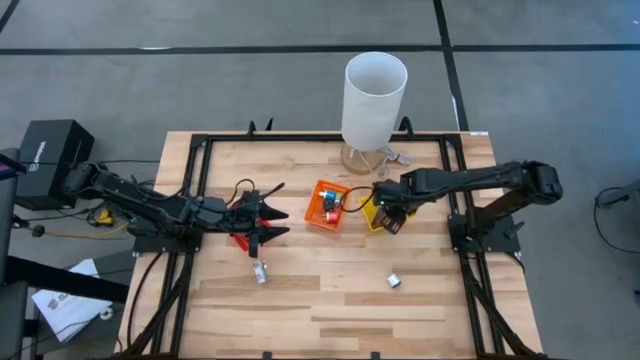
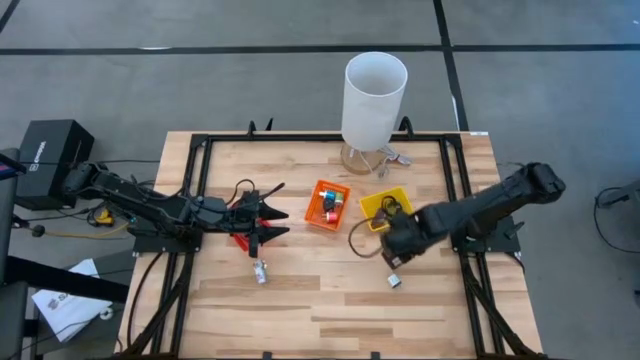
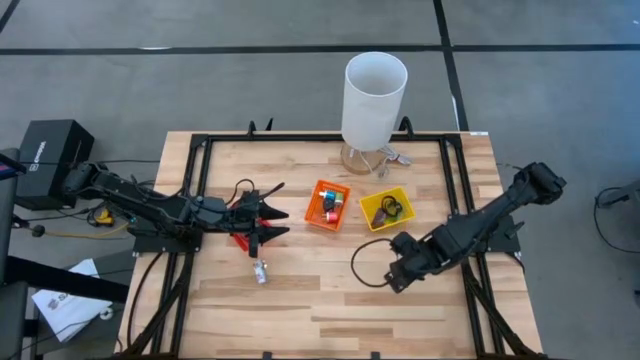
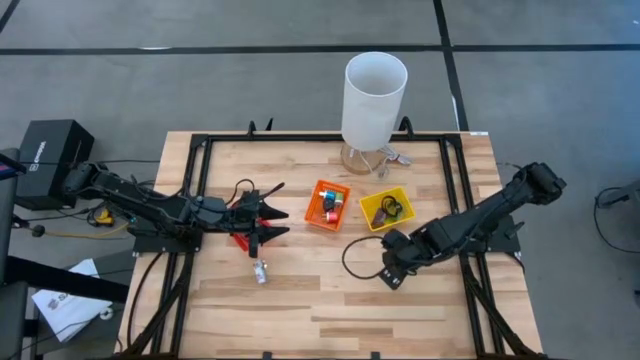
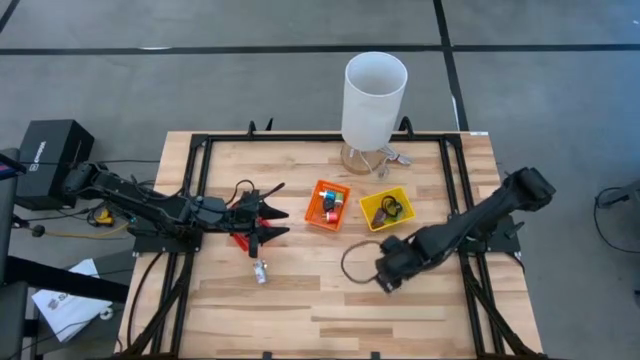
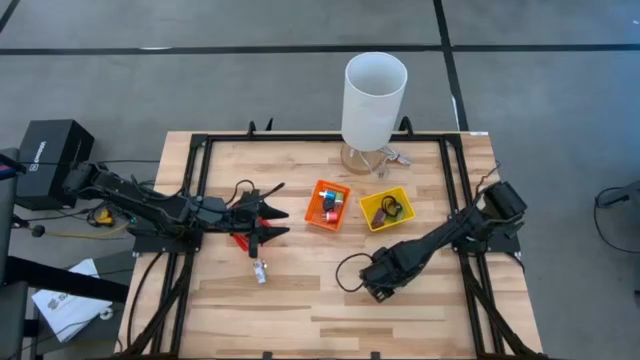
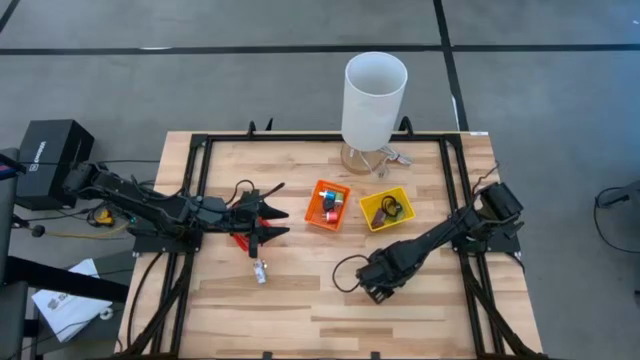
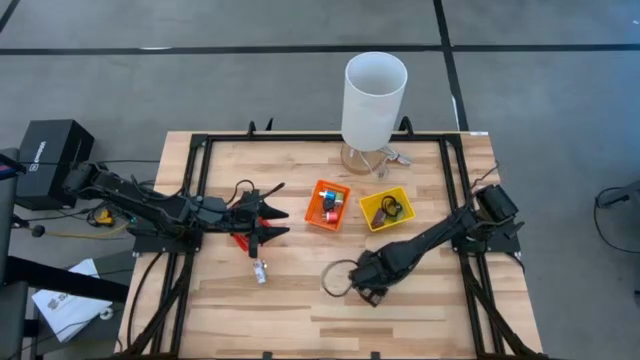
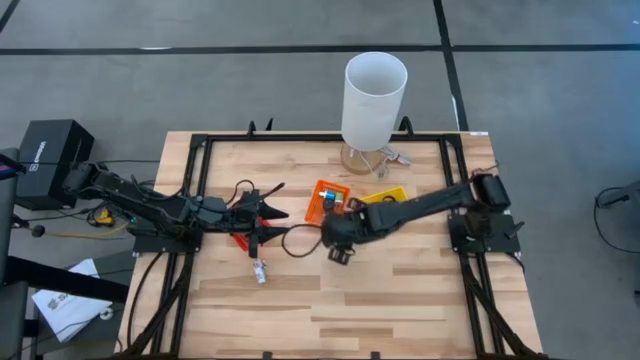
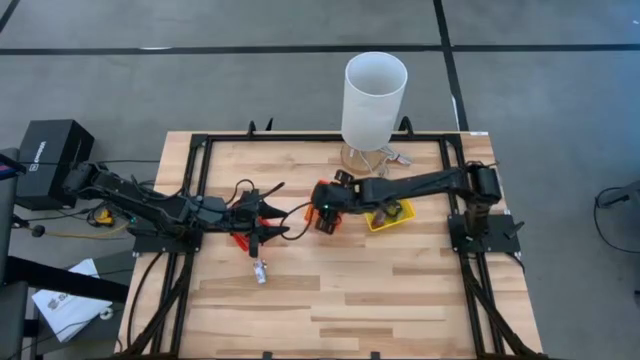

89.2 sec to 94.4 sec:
Task: Pick & Place Office items
Put the white charger adapter into the orange bin

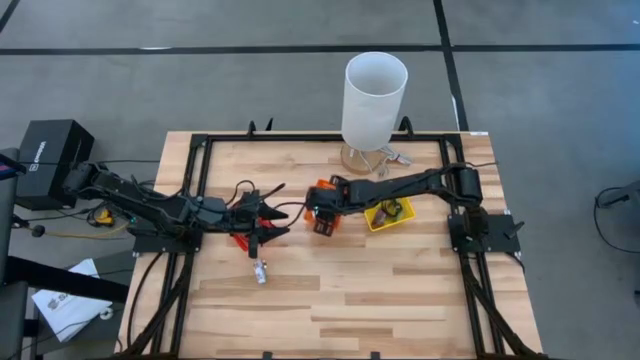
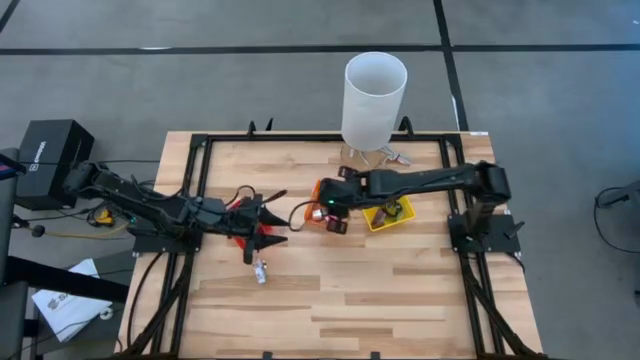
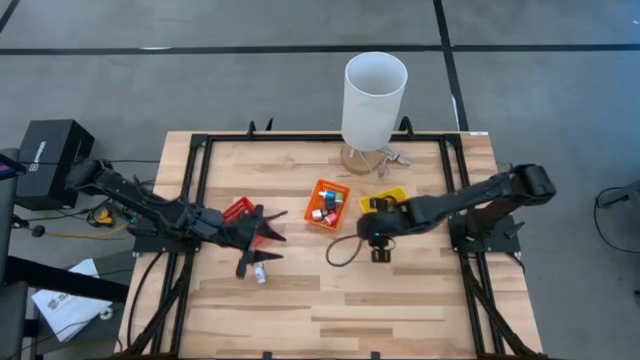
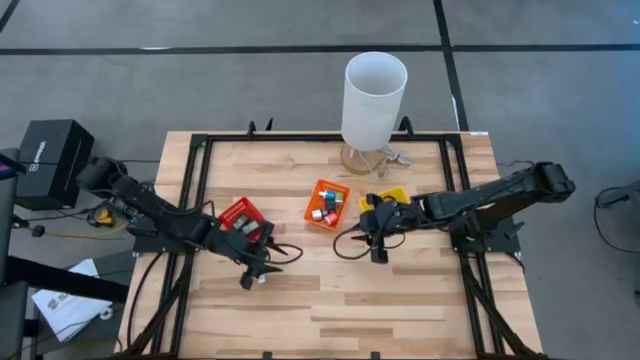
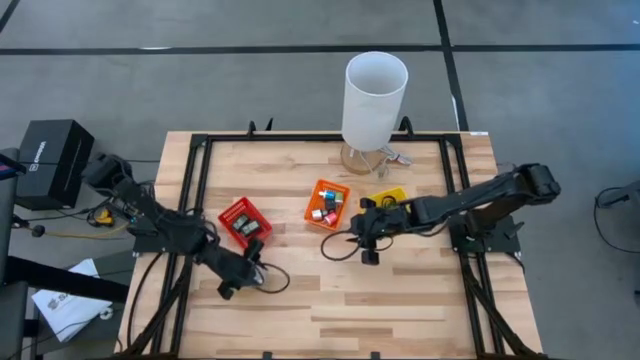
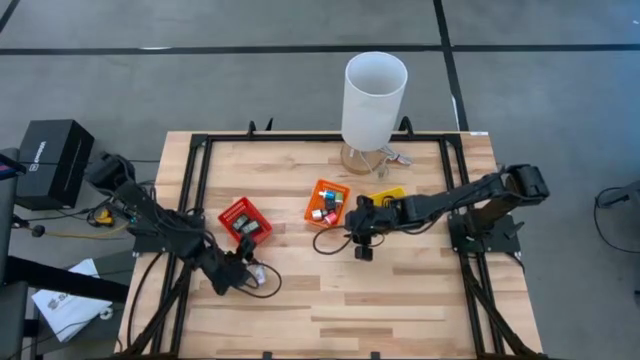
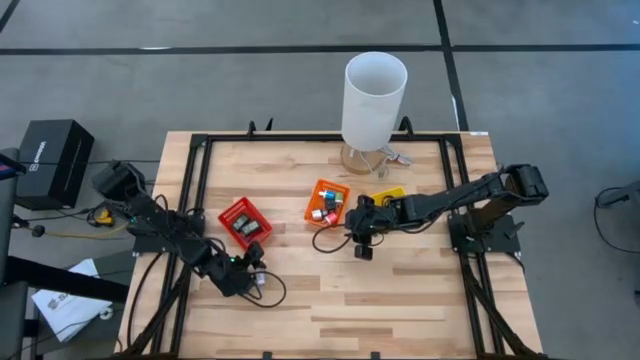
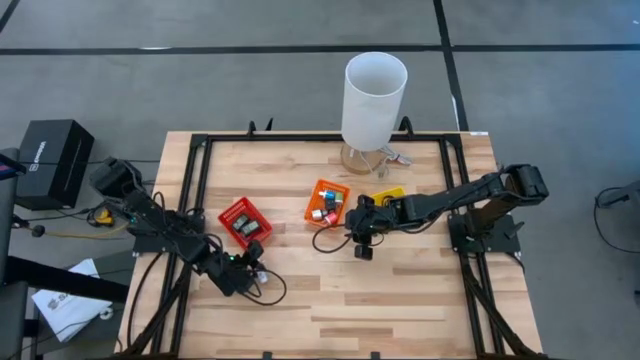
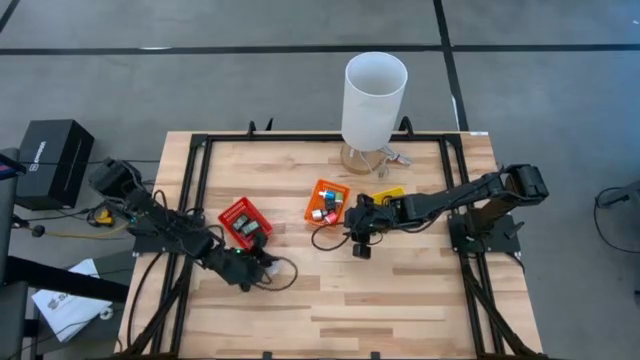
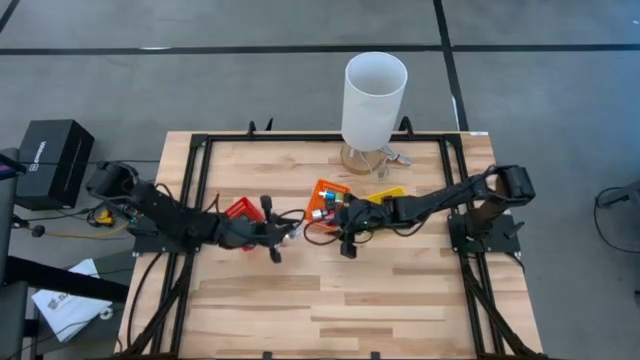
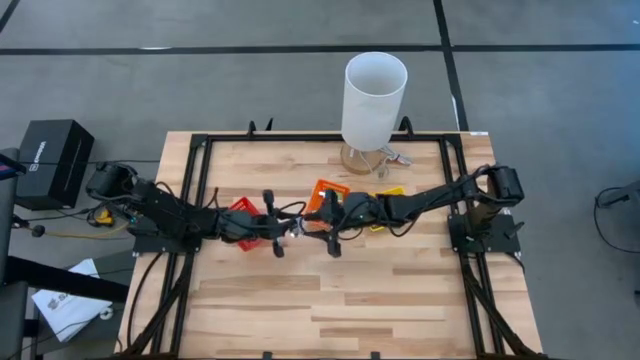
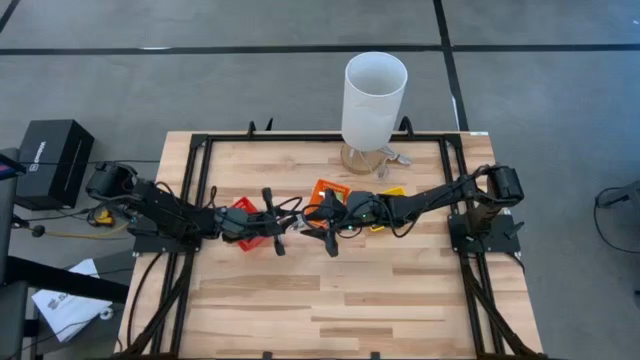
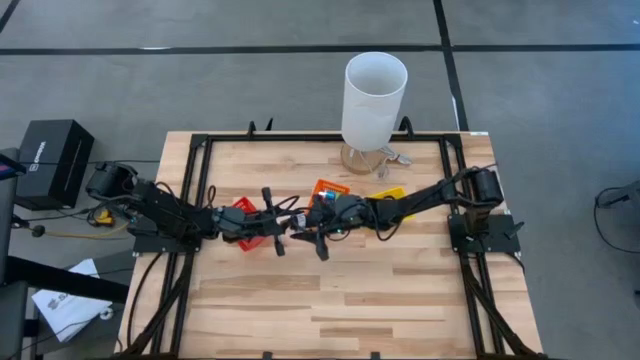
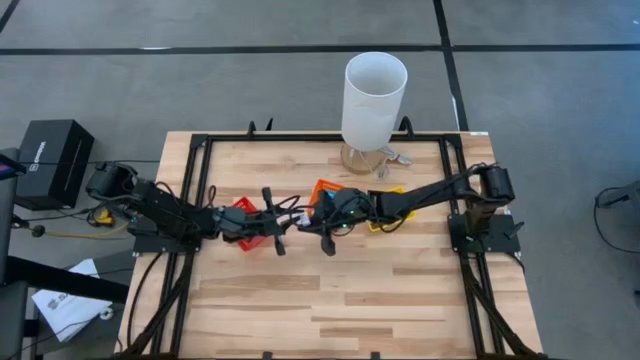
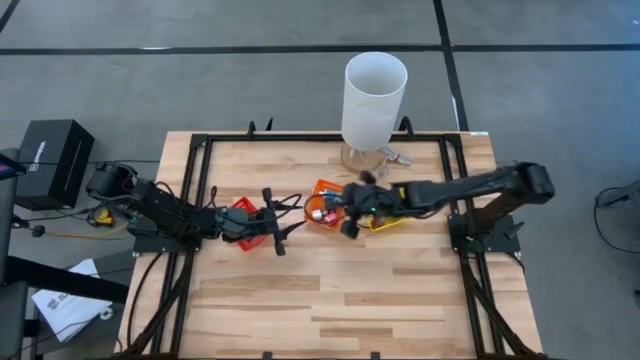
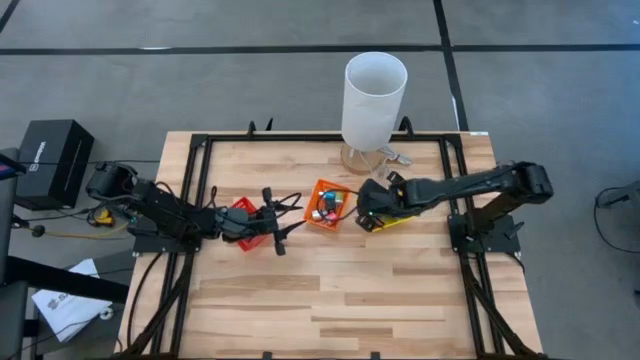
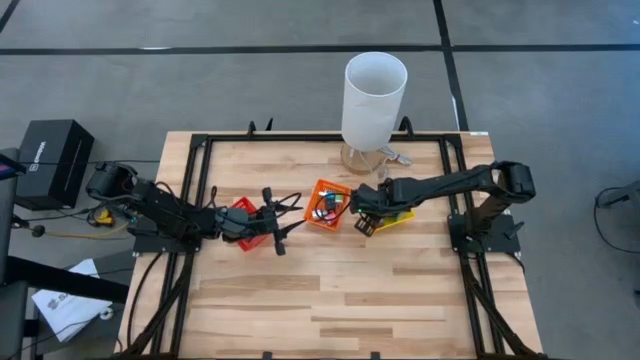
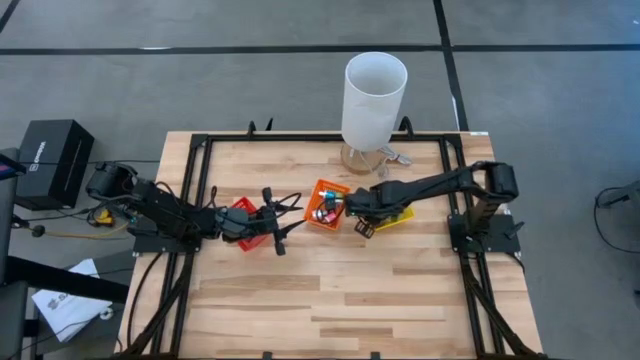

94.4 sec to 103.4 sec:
Put the white wrist watch into the yellow bin

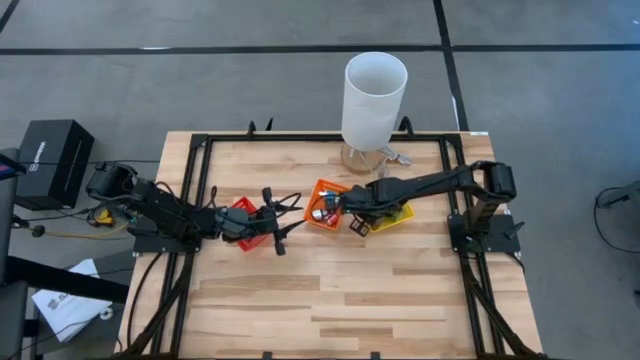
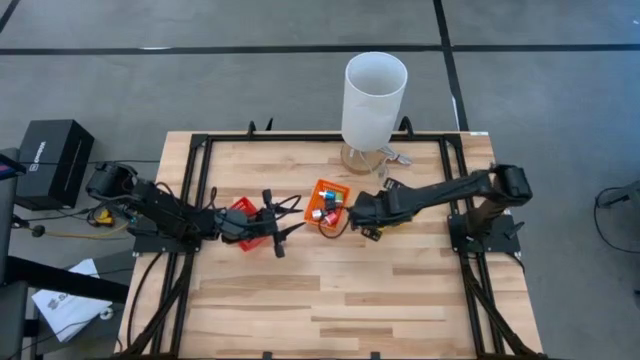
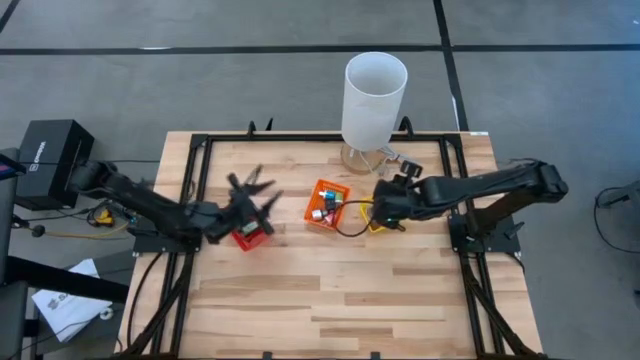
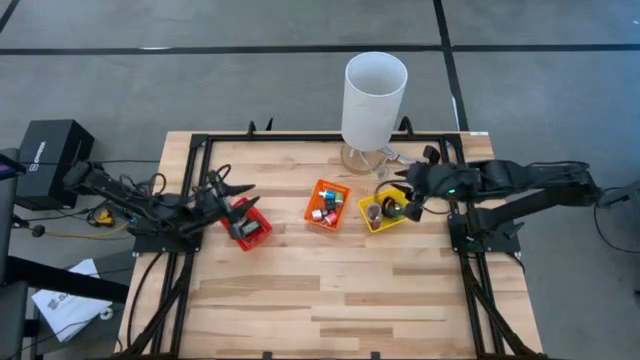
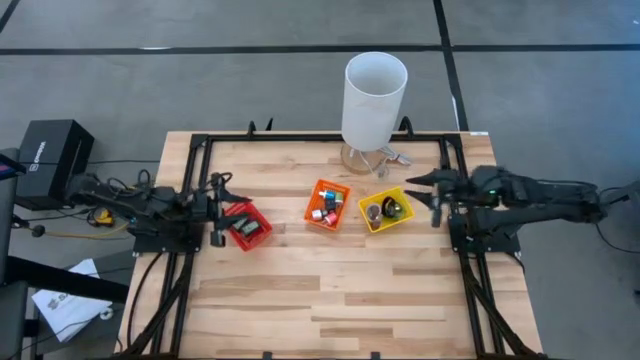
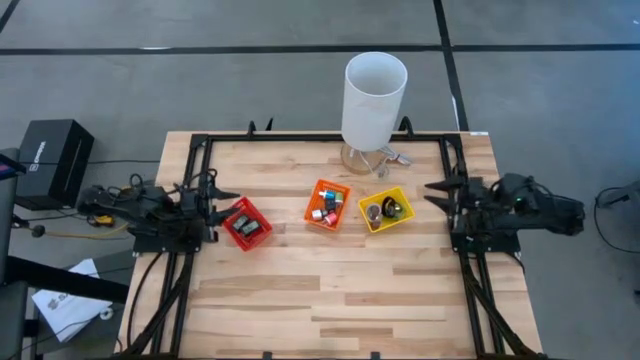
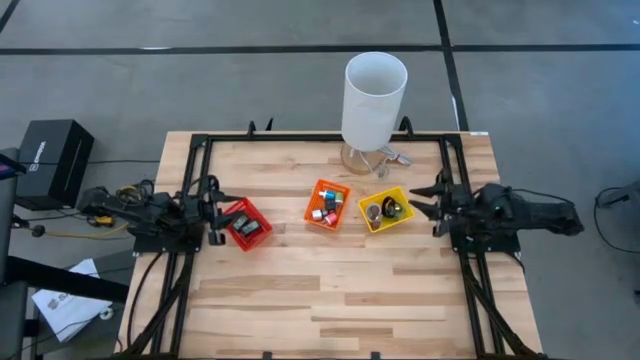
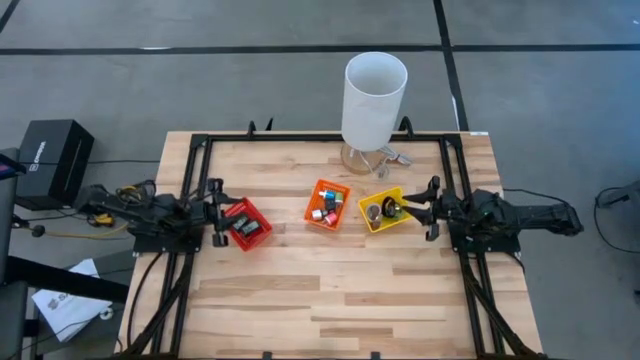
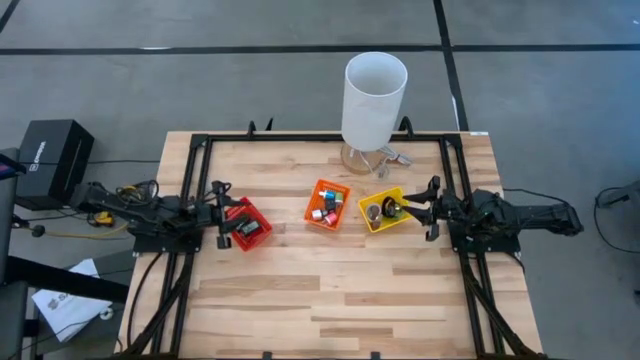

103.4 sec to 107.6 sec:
Return to Home Position

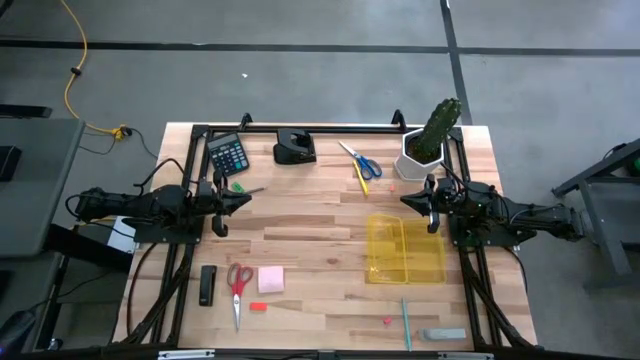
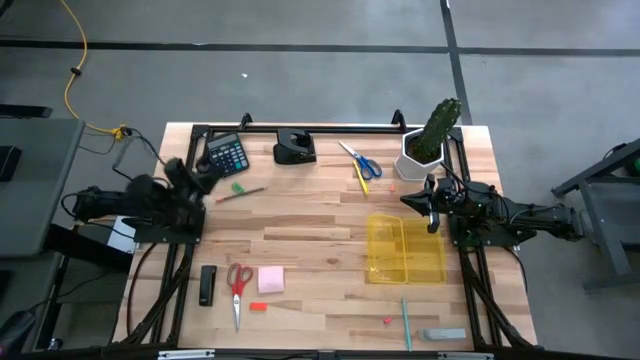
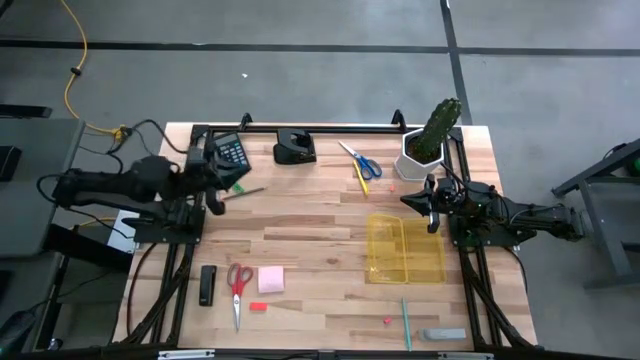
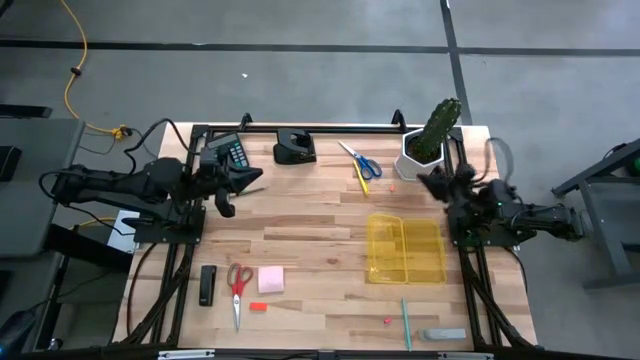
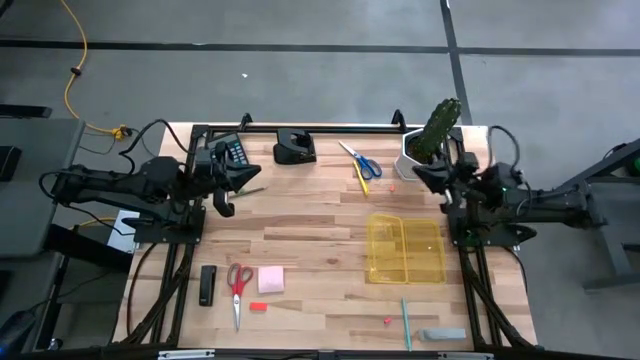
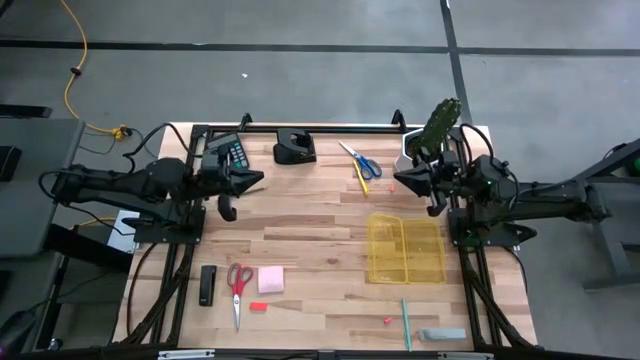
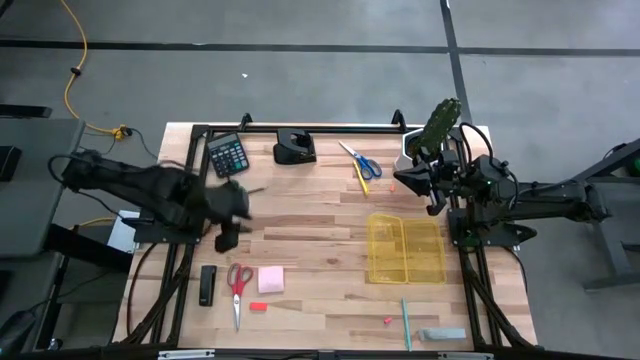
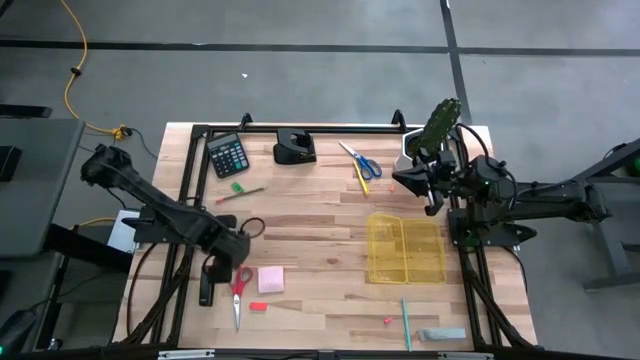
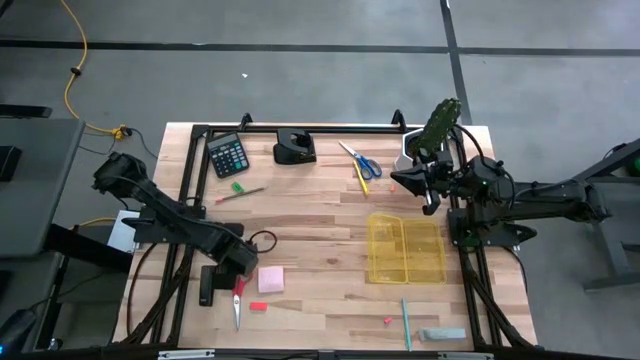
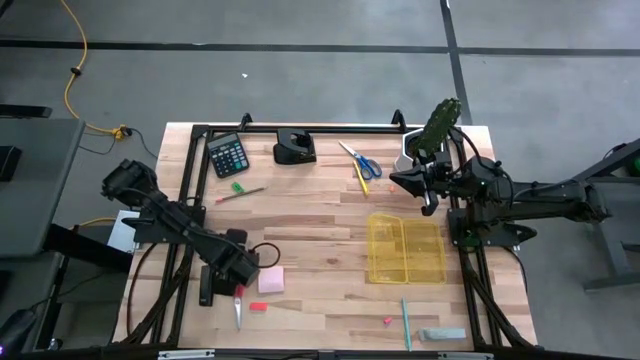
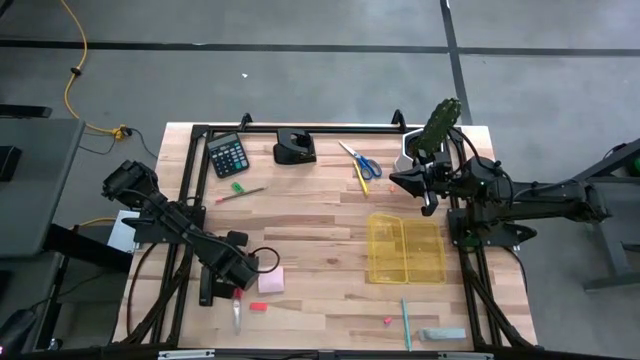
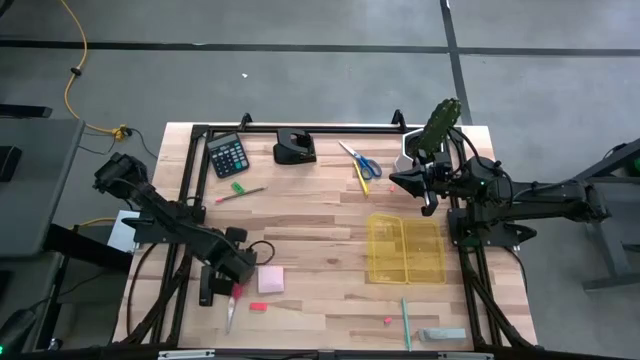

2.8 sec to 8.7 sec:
Task: Pack school essentials
Put the red scissors into the yellow box
